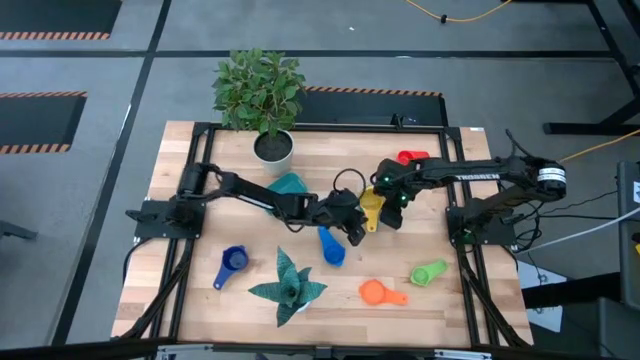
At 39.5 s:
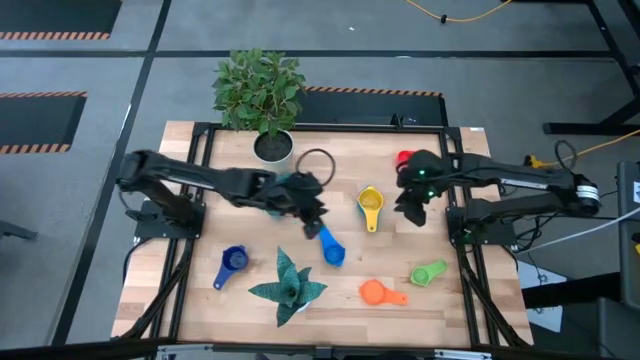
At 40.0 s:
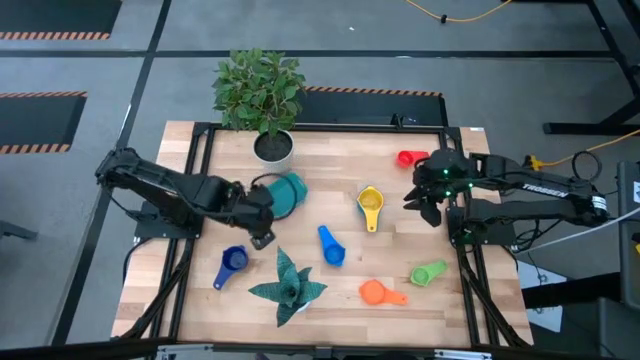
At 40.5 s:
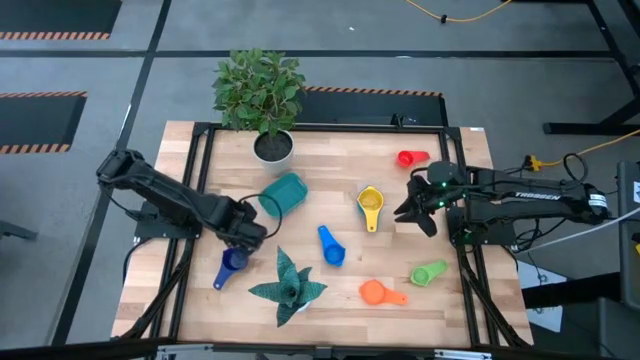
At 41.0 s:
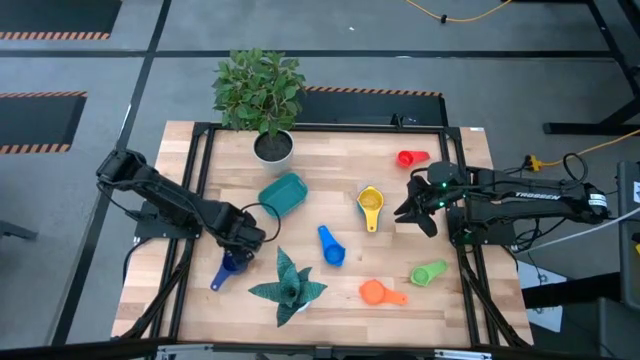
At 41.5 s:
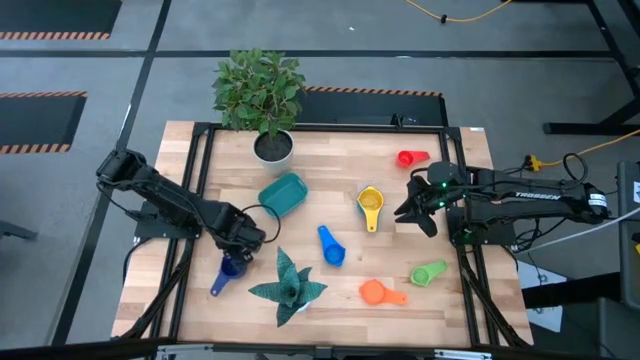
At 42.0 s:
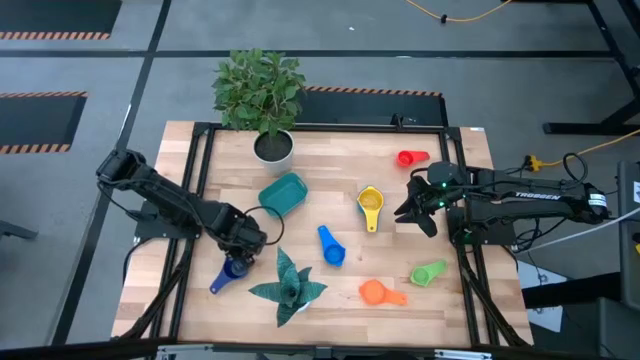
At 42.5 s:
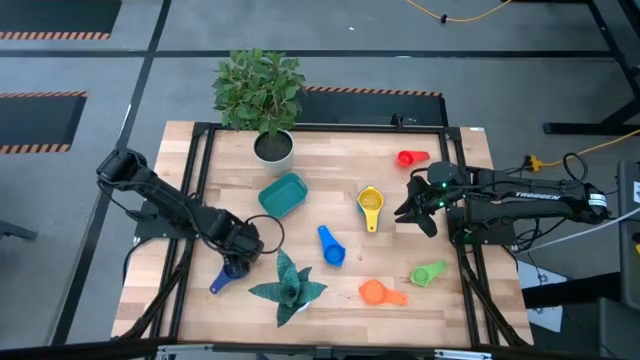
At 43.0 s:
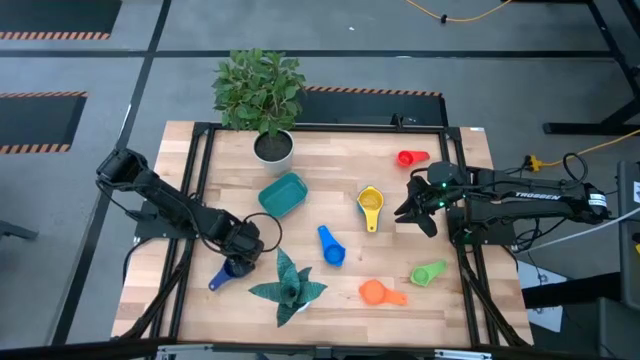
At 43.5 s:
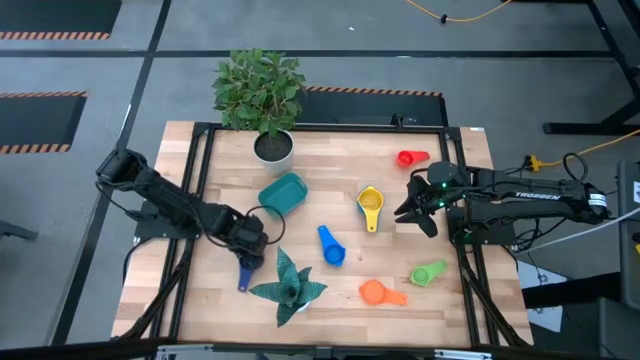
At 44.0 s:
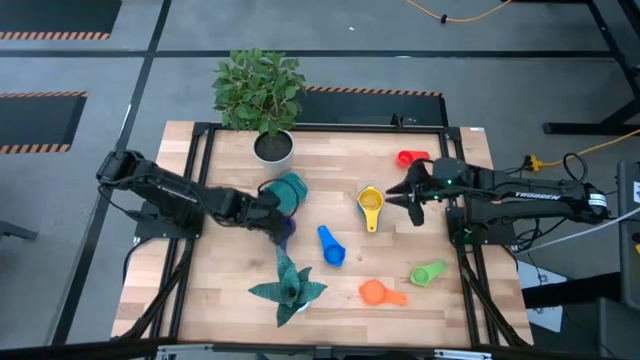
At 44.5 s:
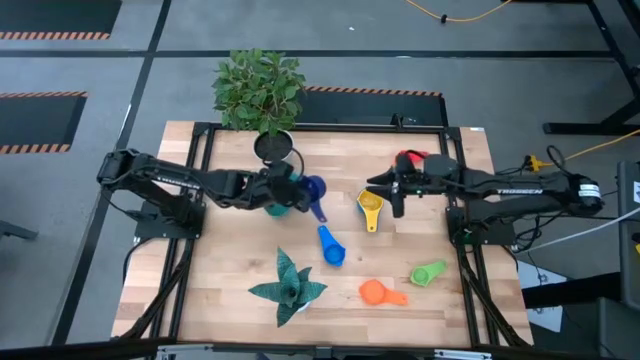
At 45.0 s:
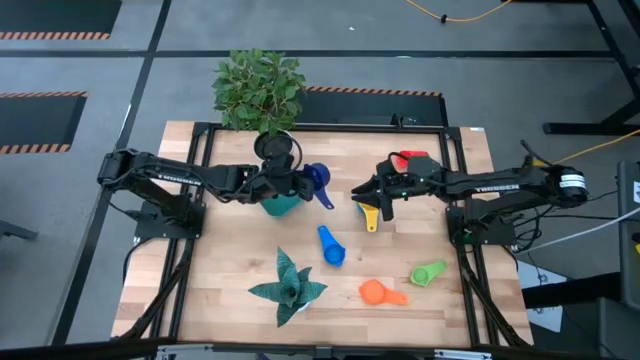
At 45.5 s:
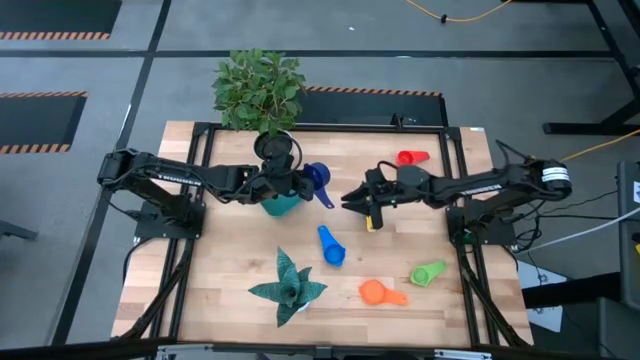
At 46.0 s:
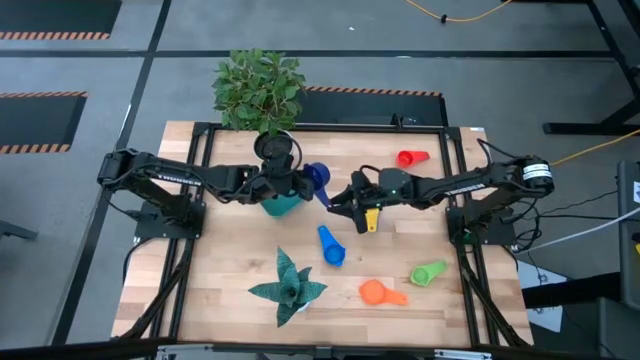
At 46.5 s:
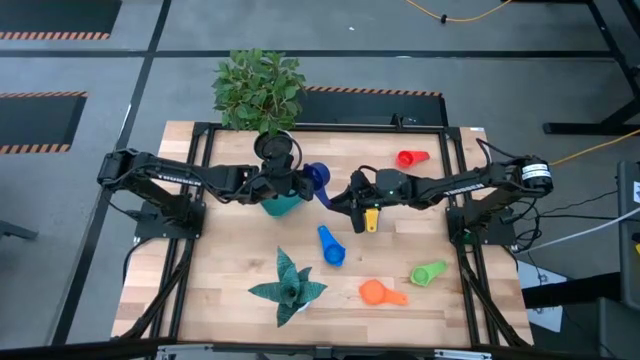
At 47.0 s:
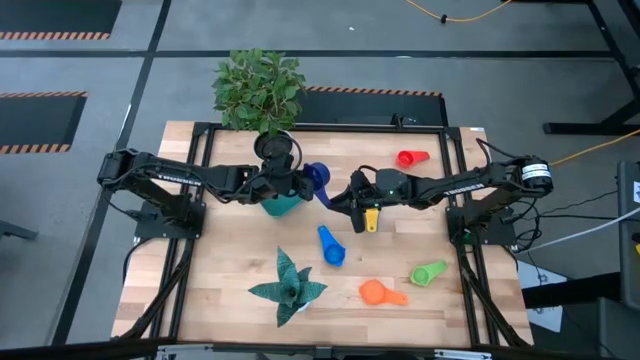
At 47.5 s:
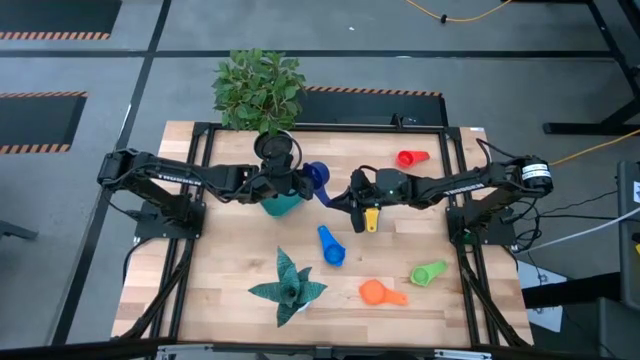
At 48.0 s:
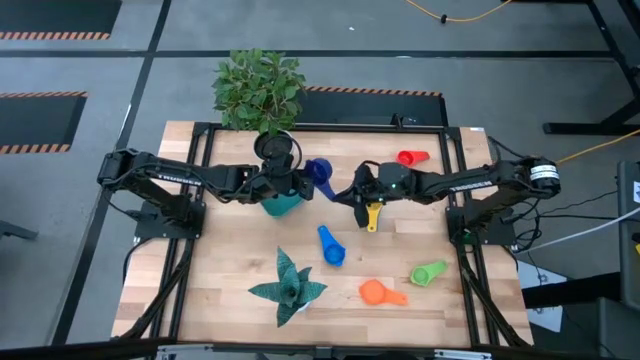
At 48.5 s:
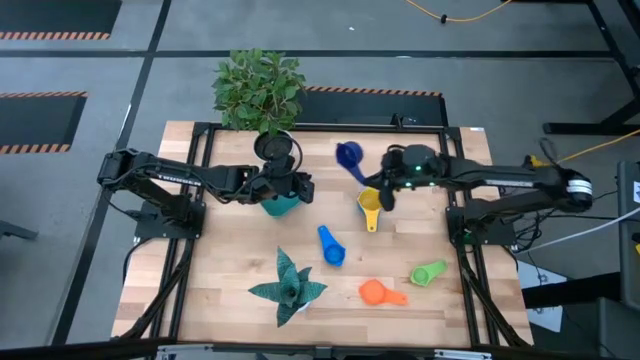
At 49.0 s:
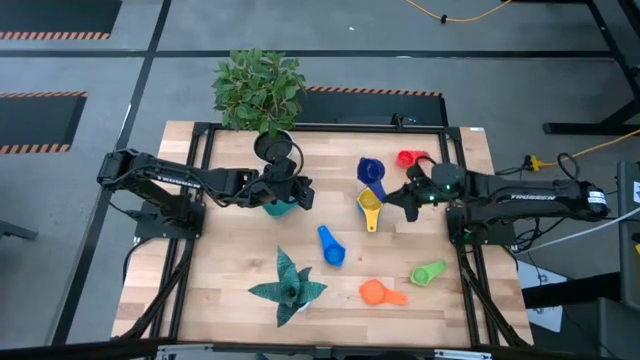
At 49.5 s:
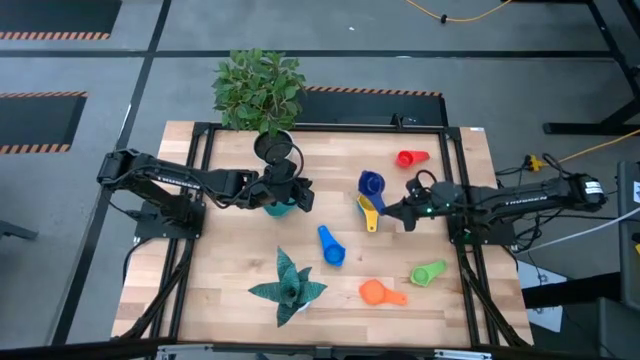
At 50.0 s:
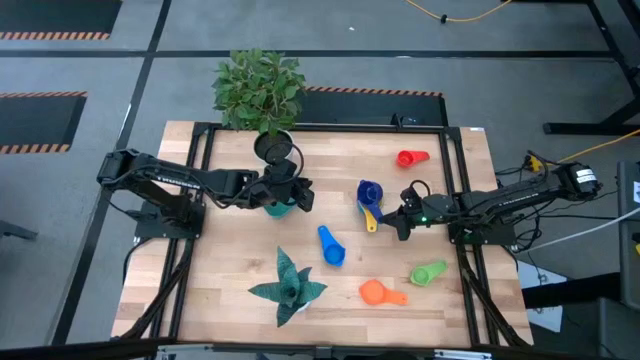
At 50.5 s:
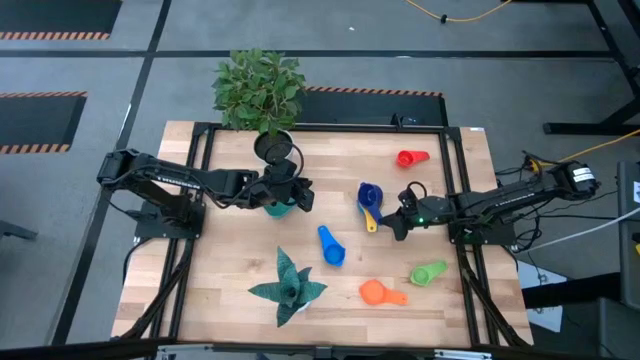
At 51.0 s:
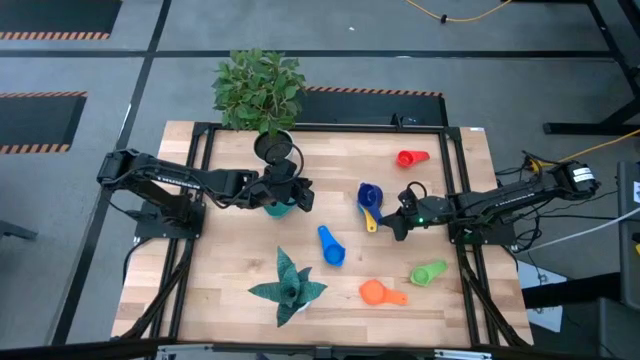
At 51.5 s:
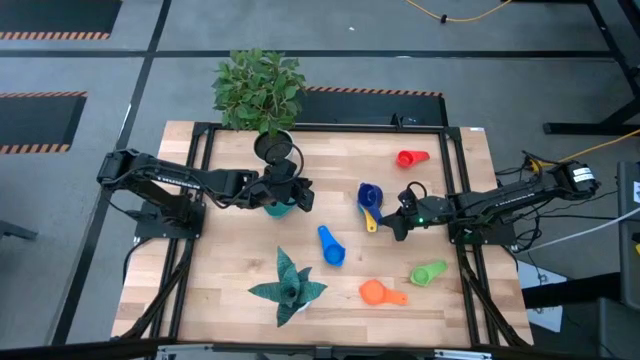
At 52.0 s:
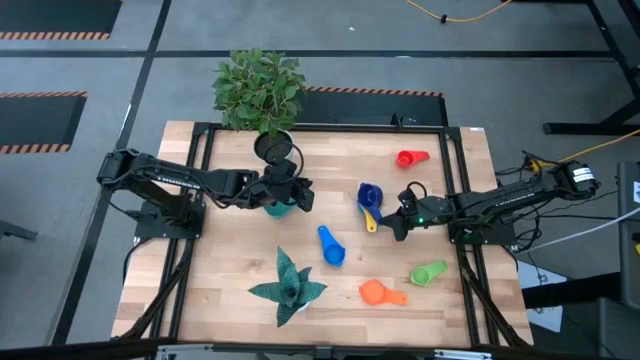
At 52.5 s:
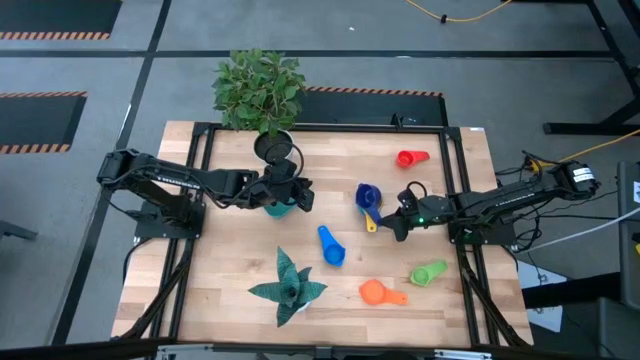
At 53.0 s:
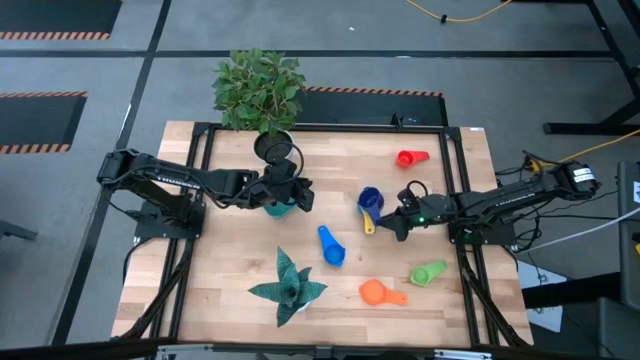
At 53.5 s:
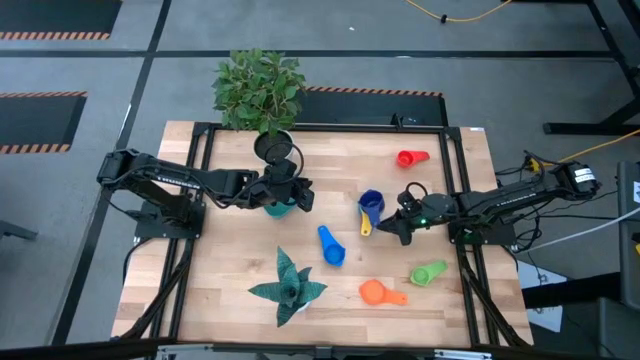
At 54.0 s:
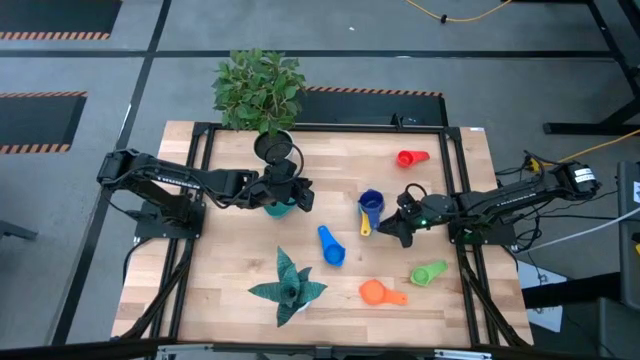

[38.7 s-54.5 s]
Task: Nest measuring cups in basket
Stack the dark blue measuring cup on top of the yellow measuring cup

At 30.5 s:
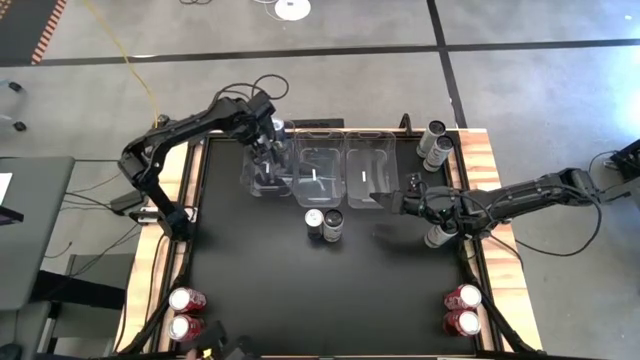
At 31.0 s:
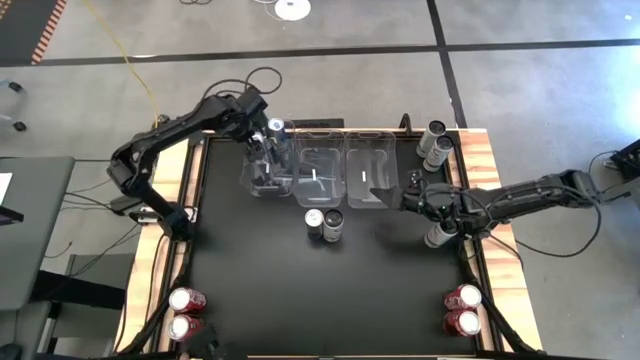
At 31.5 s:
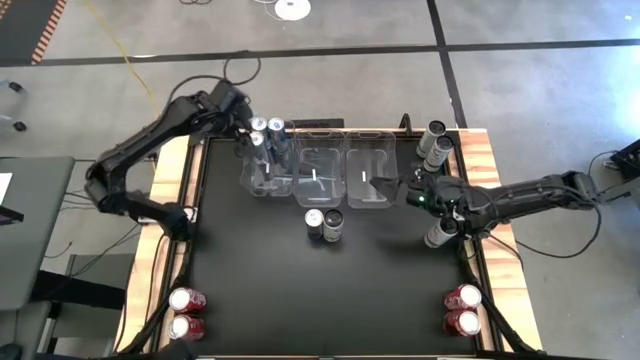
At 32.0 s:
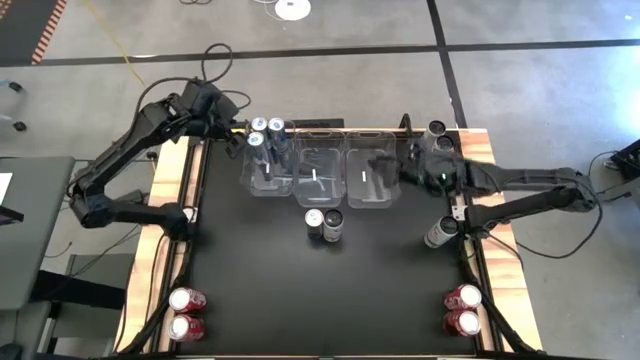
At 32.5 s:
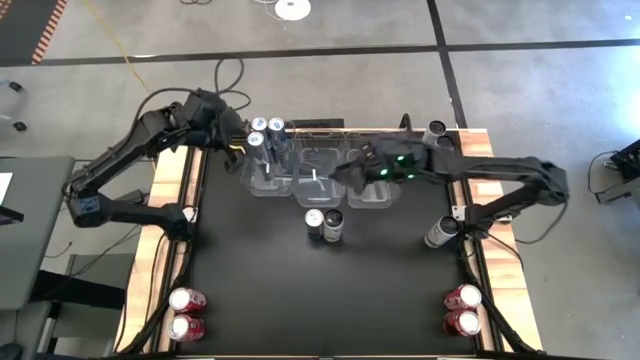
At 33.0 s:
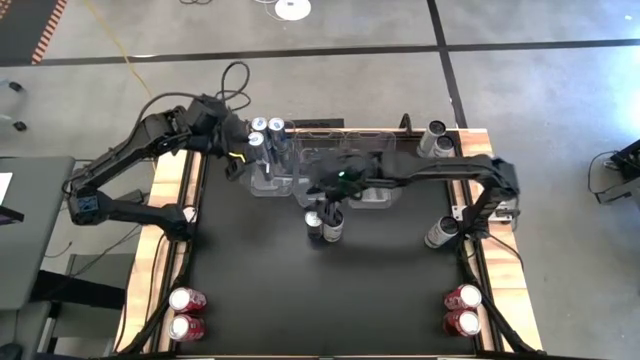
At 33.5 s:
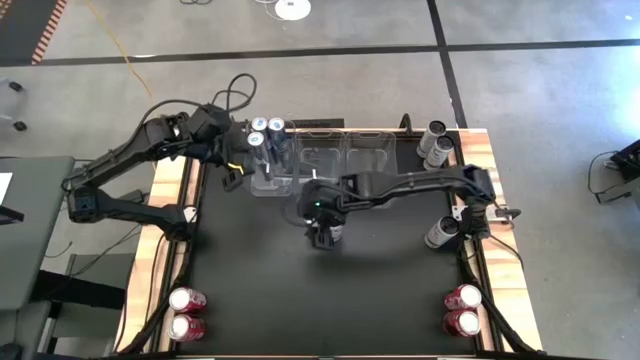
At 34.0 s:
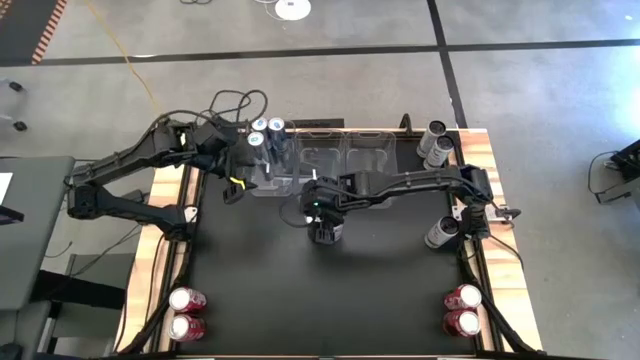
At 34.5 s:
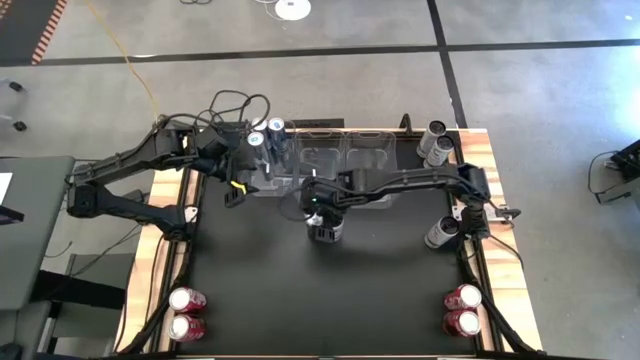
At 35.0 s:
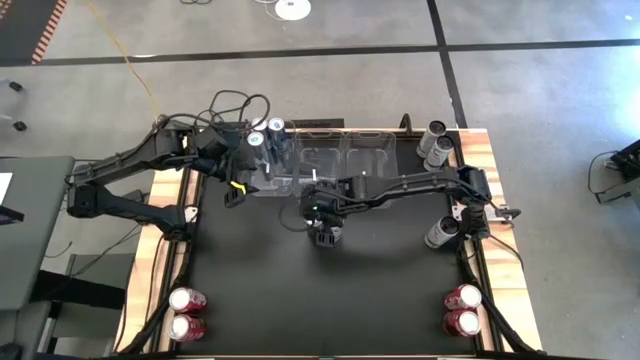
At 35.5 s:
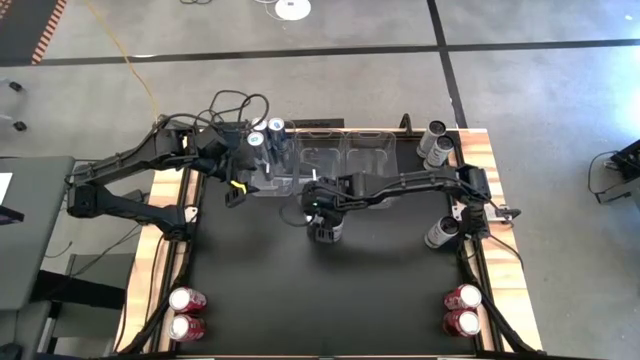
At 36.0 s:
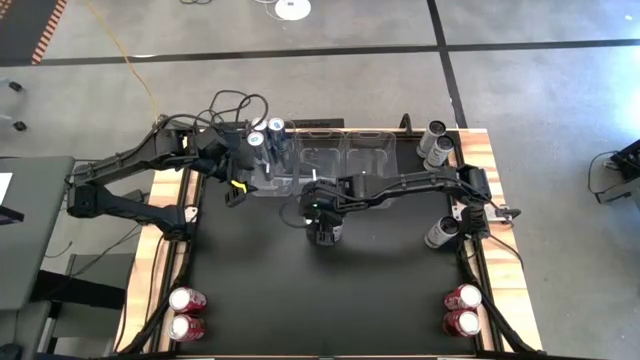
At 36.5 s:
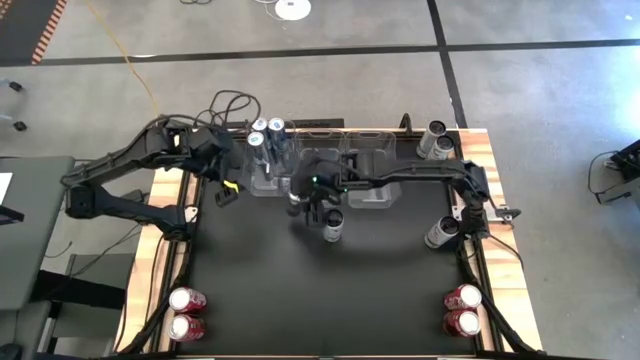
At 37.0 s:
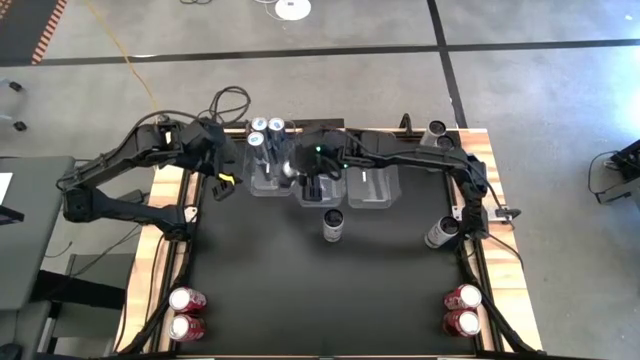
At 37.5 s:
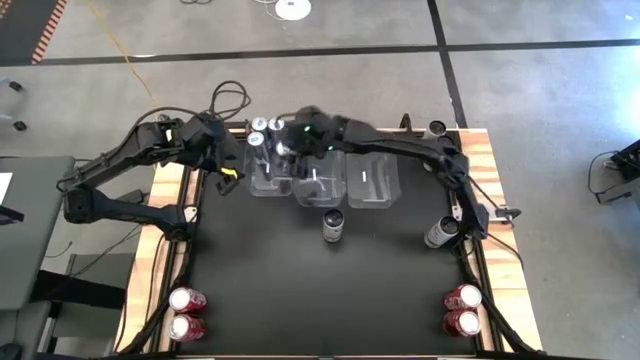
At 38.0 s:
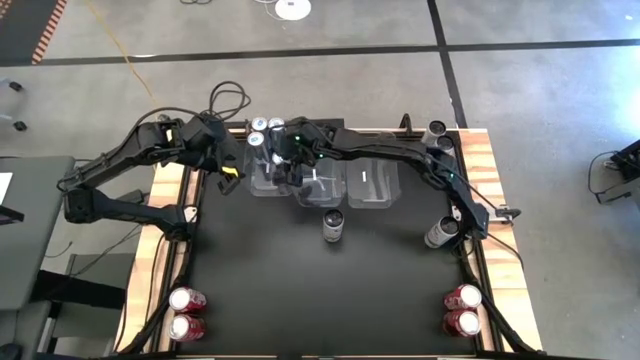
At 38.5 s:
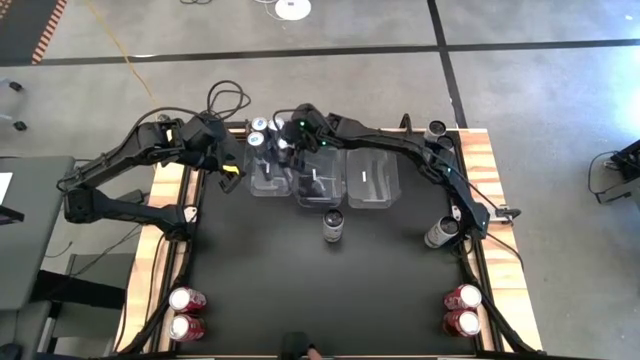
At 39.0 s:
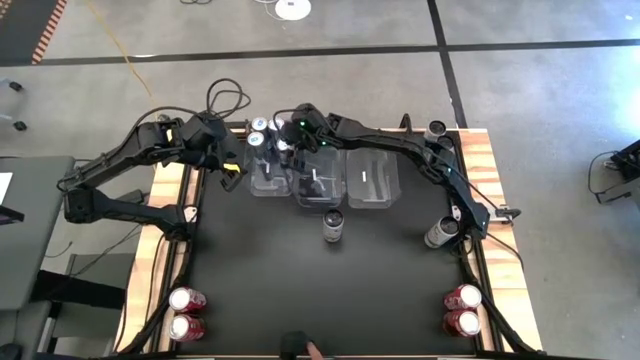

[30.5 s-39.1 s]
Task: Sort soda cans
Put the blue soda can into the left transparent bin
